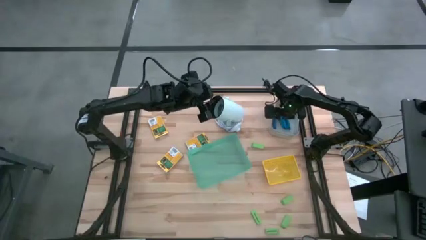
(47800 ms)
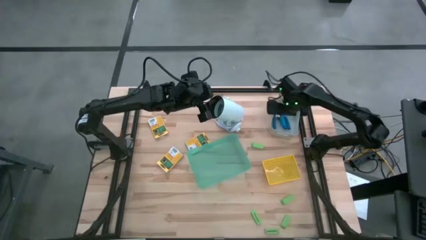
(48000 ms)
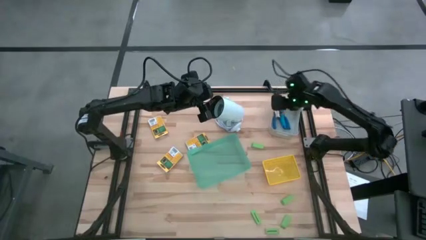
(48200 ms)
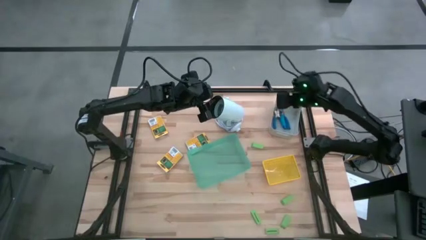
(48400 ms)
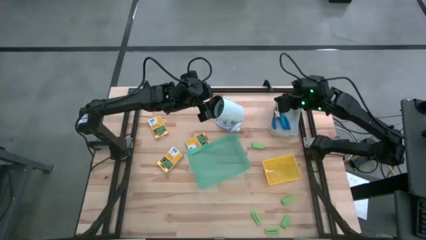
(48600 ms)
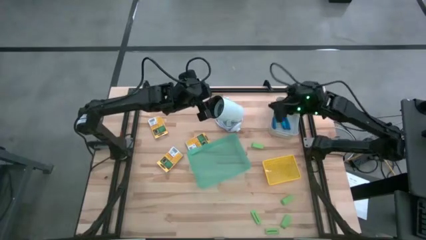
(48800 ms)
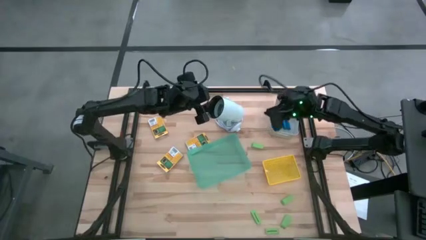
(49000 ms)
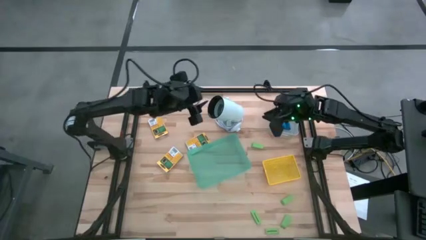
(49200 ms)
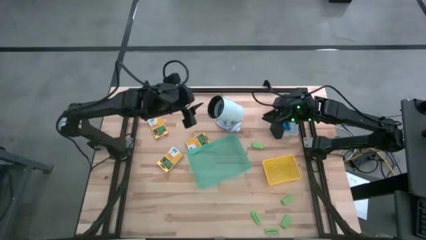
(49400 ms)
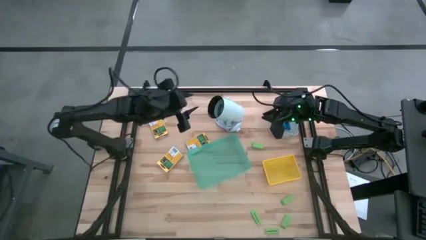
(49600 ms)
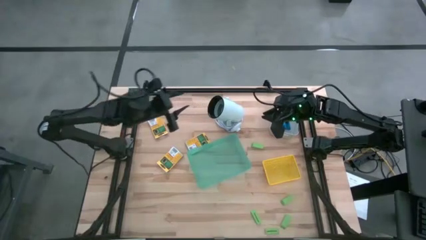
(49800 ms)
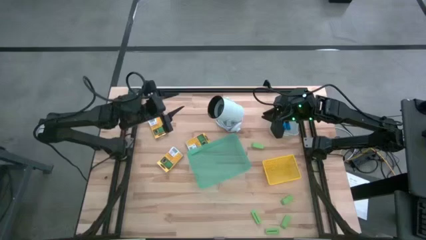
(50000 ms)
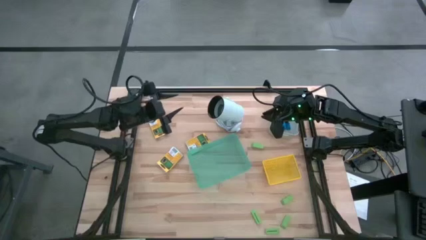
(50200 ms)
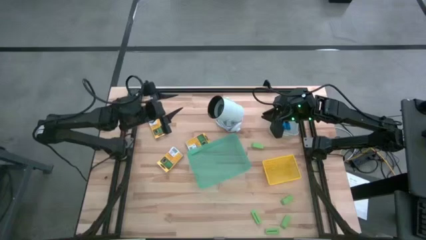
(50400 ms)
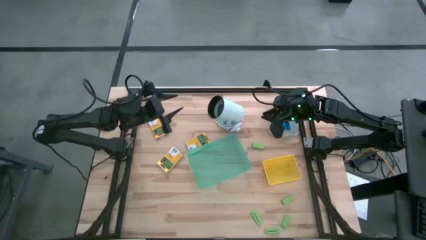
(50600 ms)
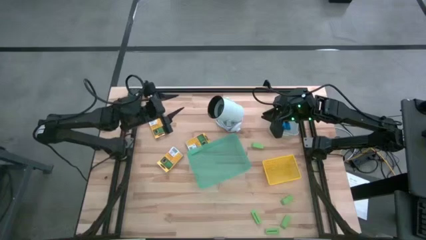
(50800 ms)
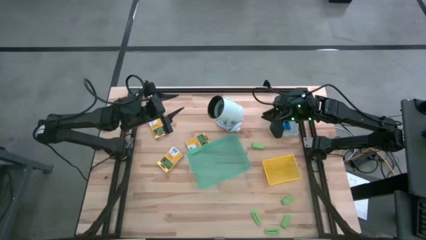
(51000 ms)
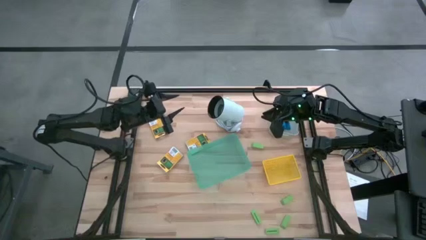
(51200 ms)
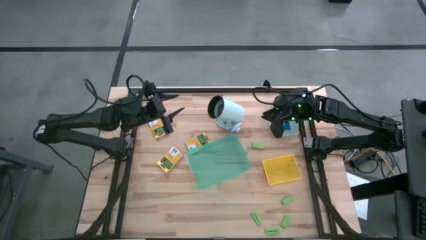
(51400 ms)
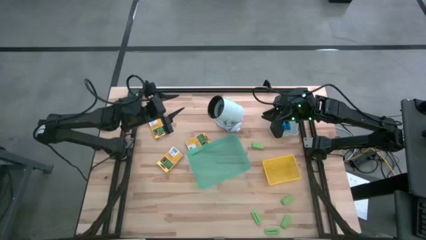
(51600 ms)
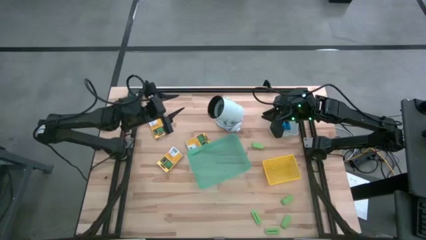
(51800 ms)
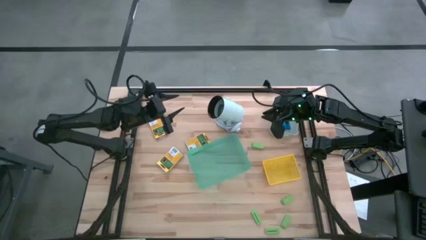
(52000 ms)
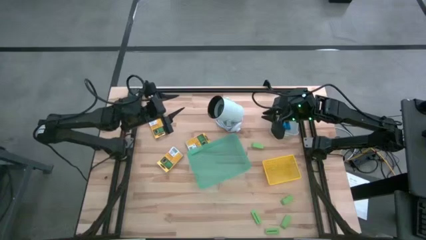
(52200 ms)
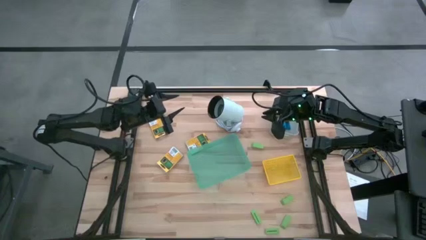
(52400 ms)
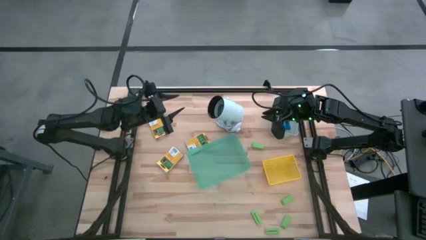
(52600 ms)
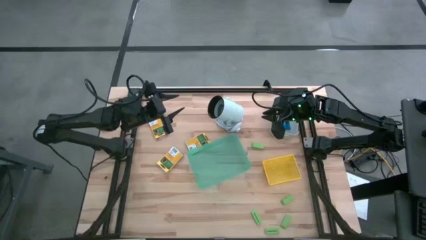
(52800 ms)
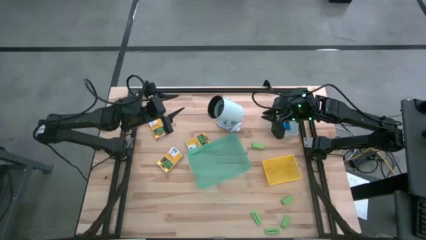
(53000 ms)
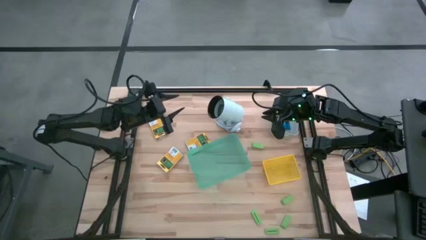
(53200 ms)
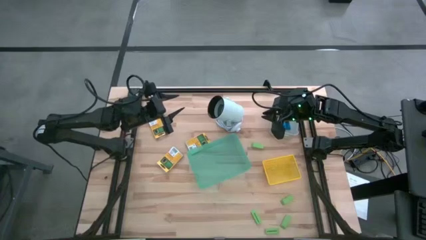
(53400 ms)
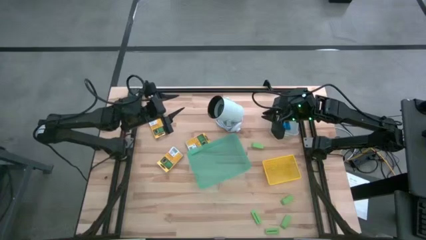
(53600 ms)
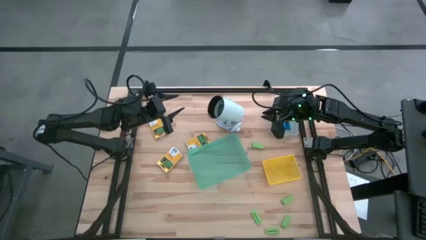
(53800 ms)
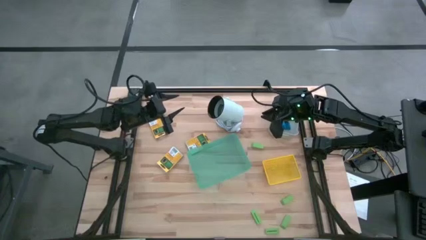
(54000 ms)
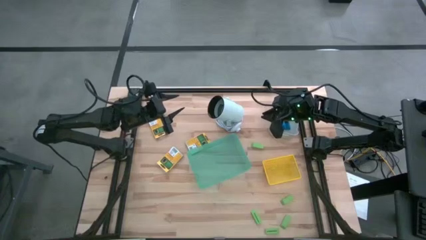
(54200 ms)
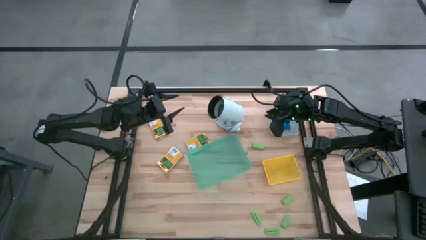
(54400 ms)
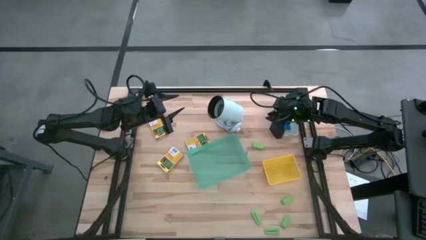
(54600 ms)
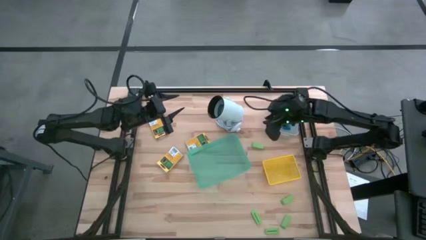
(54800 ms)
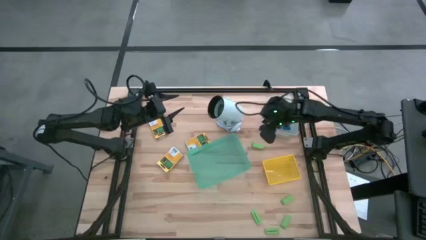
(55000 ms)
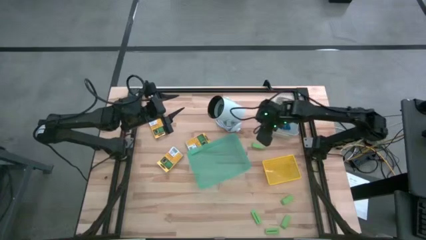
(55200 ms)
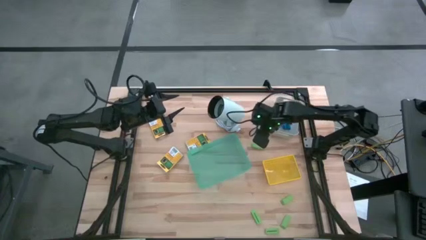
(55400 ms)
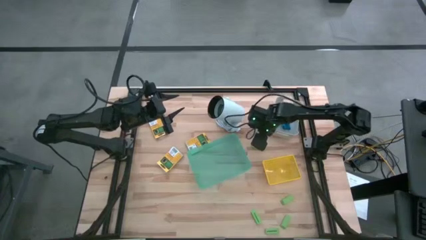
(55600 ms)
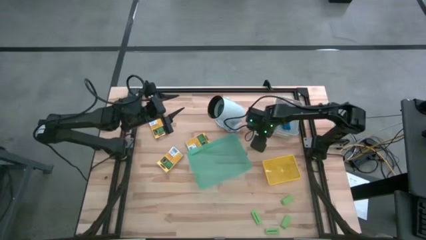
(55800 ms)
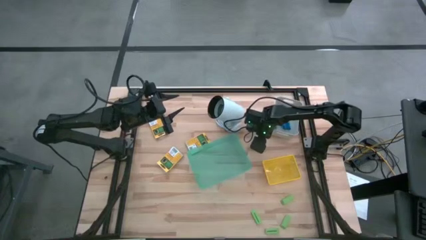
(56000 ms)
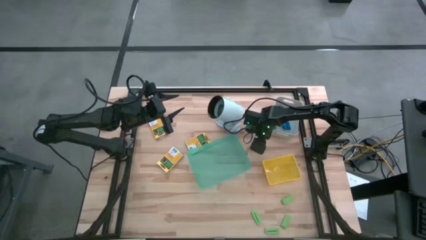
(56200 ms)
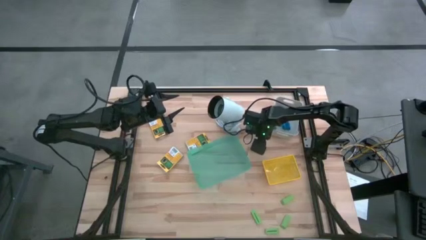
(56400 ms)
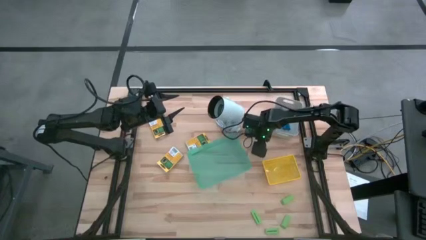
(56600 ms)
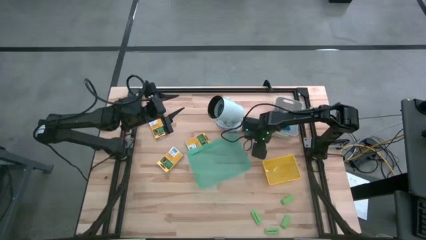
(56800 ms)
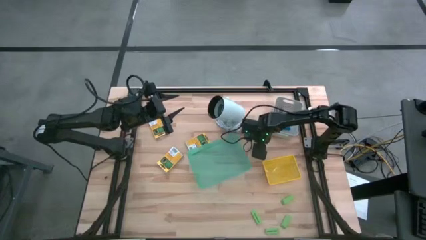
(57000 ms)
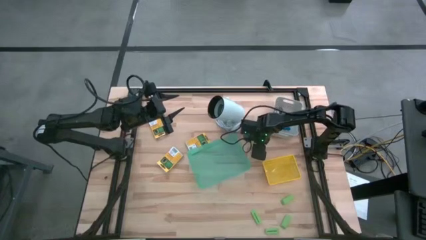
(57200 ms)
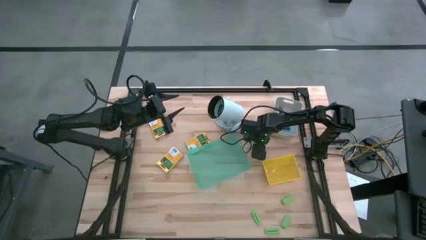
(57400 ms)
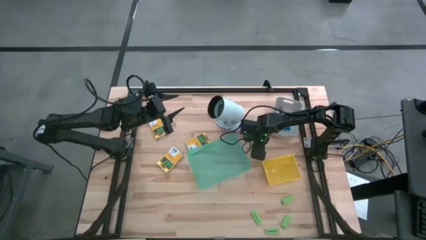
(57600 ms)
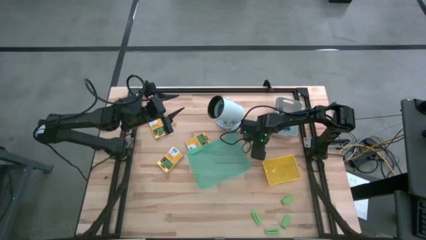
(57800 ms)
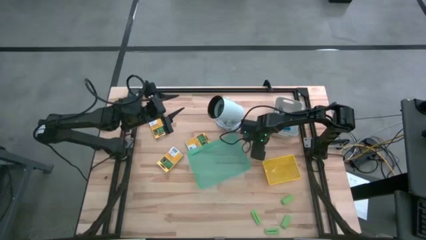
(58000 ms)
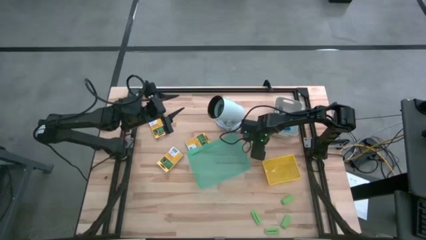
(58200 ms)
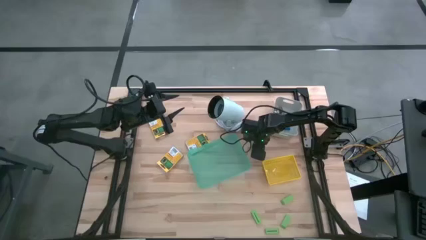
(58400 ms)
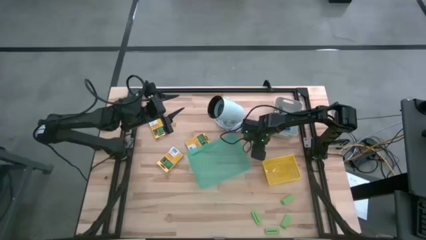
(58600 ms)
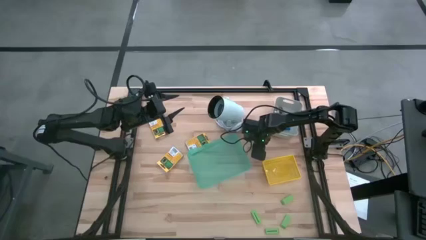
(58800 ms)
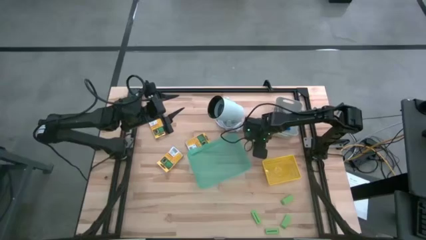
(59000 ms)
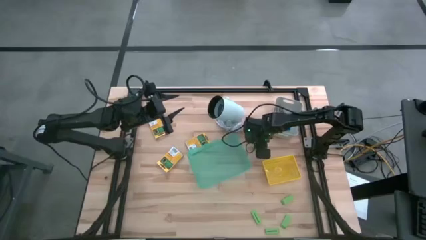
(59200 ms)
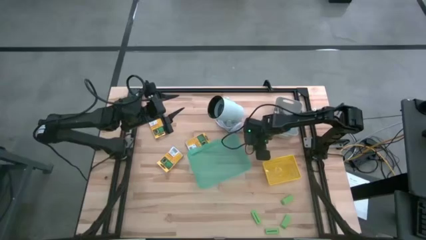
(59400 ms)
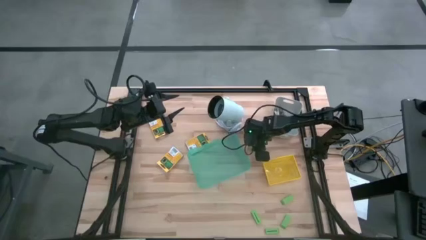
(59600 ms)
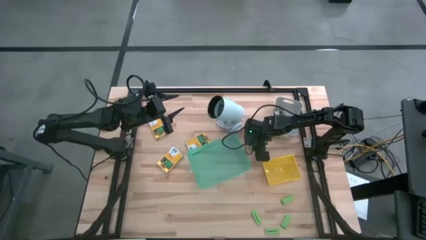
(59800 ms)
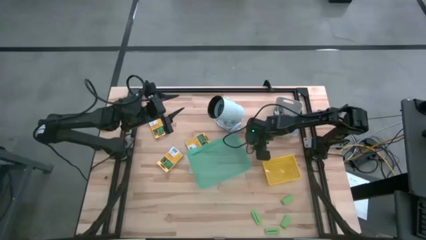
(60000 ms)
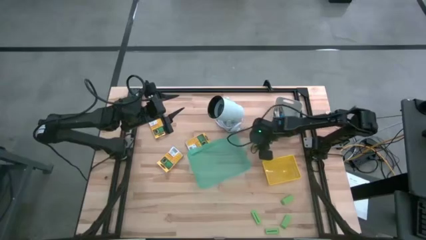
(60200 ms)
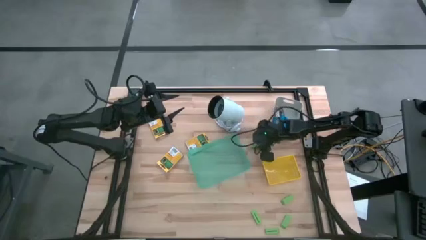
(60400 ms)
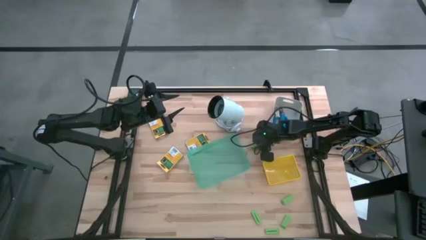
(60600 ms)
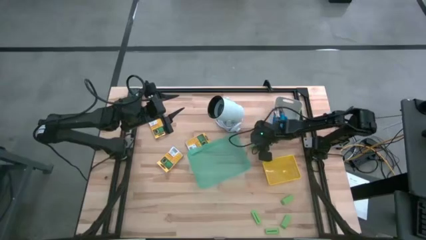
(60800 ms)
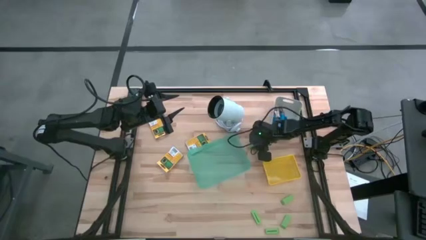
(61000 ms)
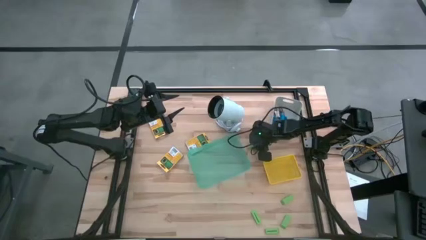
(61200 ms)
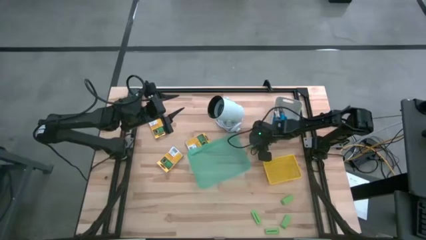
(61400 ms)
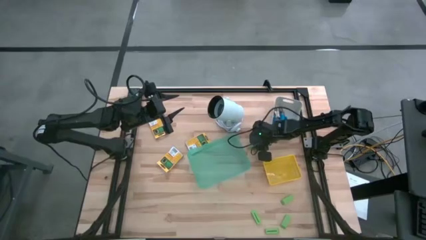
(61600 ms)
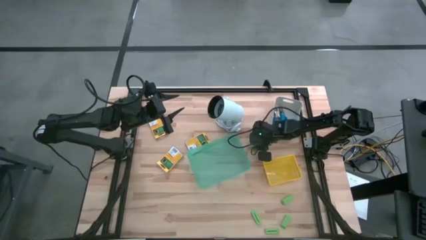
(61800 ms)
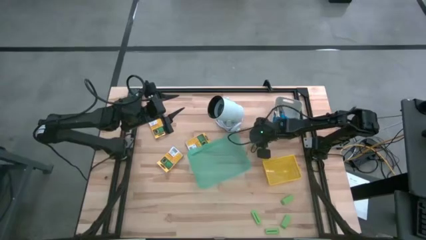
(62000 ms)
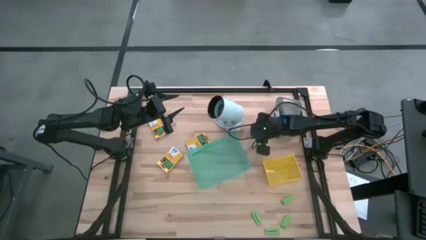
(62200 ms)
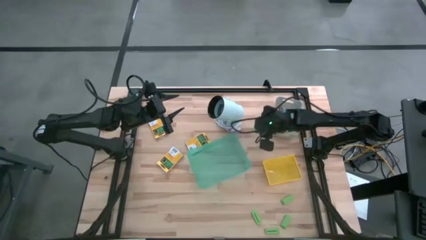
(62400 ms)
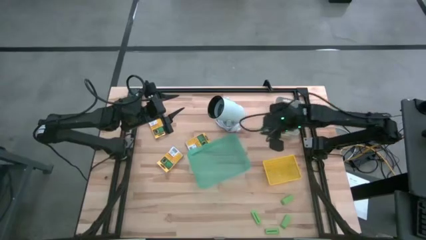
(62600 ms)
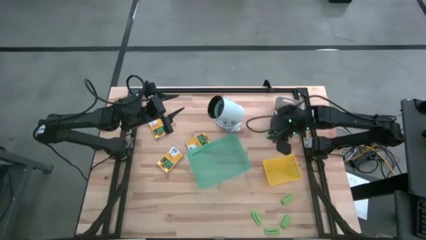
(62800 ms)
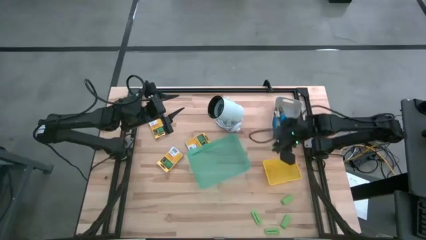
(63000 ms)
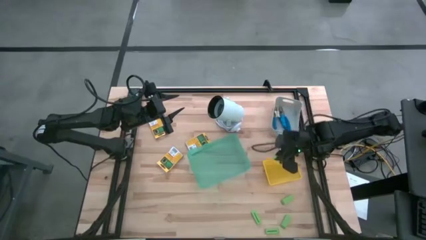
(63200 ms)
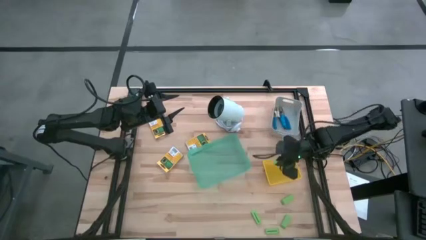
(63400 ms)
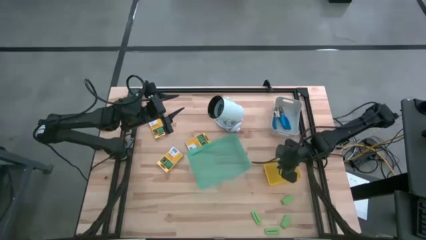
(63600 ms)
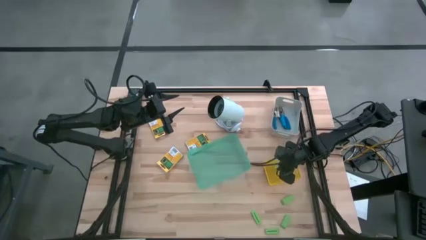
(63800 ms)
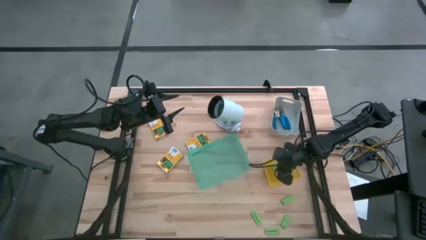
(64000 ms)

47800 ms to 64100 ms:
Task: Pick & Place School Supplies
Put the green eraser into the yellow bin
